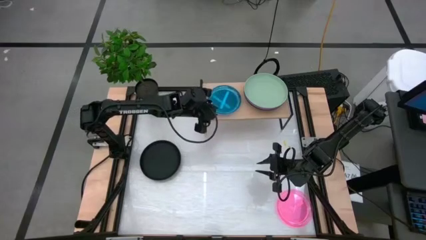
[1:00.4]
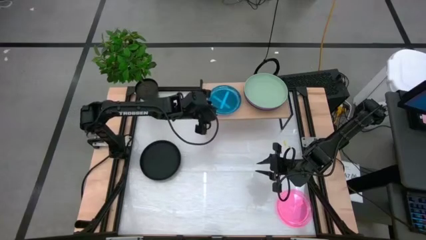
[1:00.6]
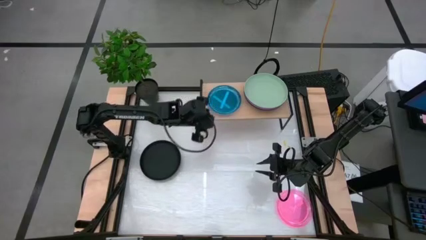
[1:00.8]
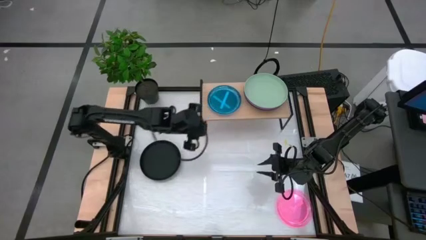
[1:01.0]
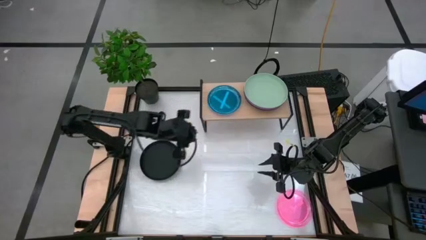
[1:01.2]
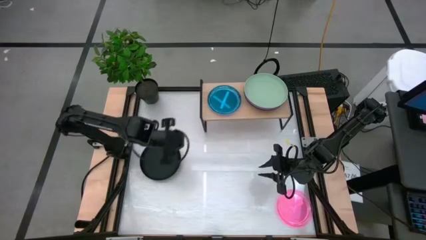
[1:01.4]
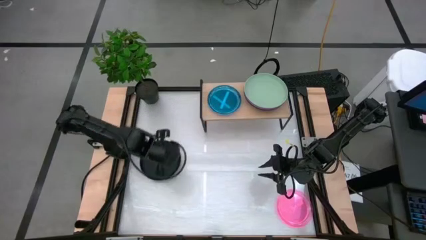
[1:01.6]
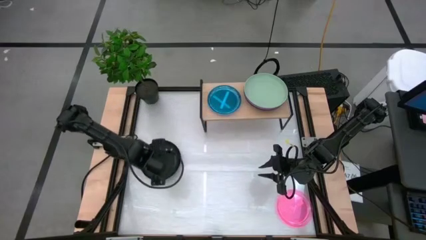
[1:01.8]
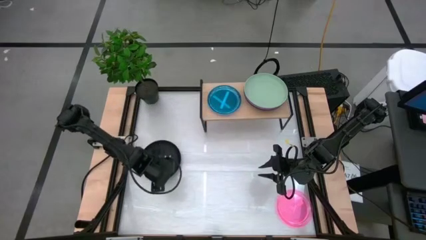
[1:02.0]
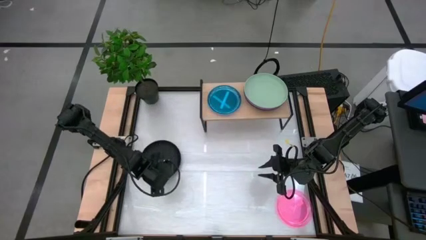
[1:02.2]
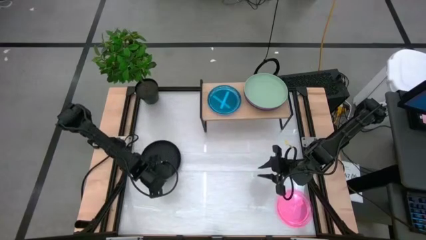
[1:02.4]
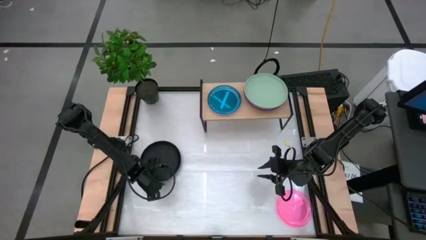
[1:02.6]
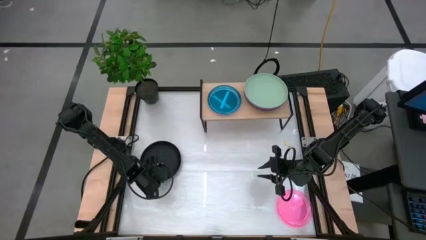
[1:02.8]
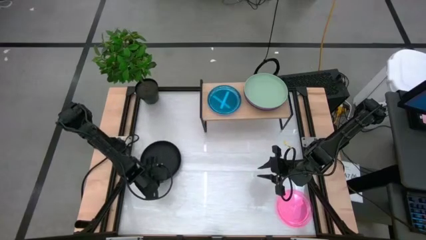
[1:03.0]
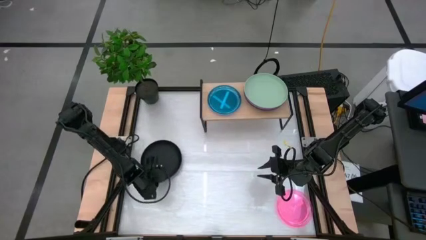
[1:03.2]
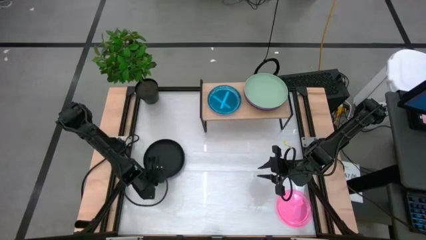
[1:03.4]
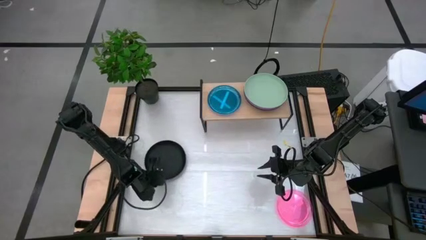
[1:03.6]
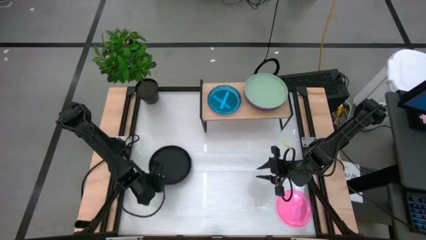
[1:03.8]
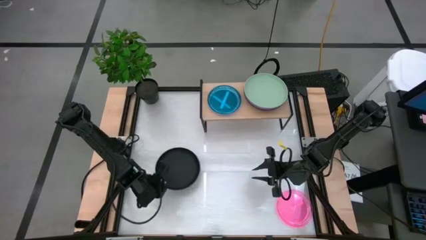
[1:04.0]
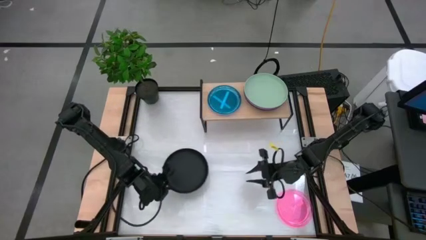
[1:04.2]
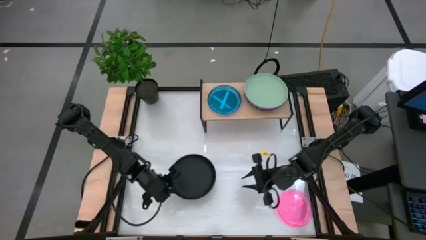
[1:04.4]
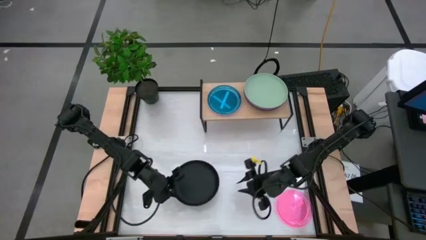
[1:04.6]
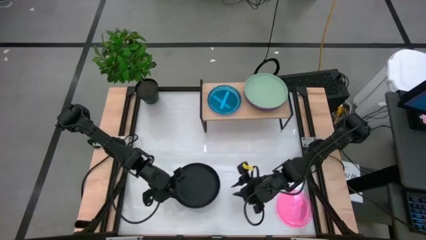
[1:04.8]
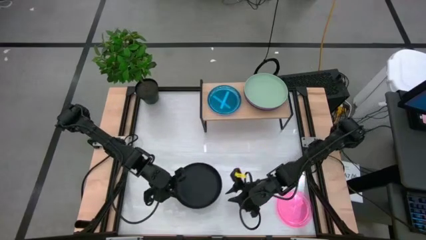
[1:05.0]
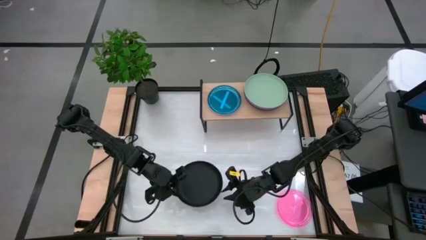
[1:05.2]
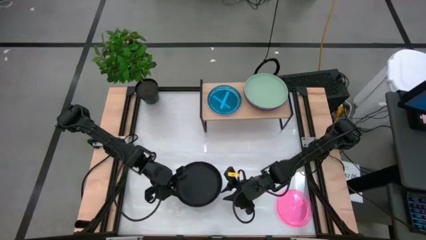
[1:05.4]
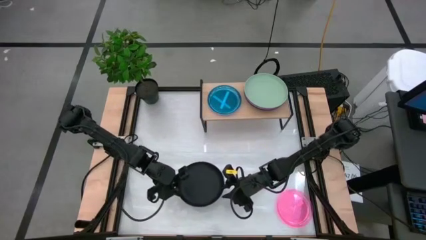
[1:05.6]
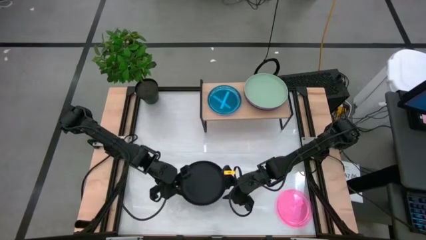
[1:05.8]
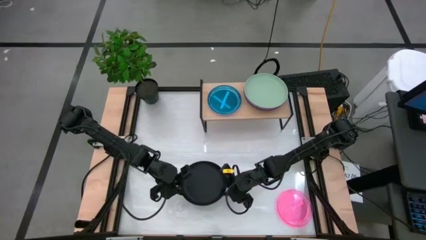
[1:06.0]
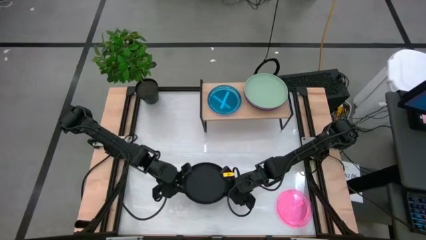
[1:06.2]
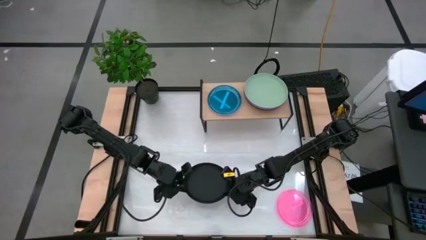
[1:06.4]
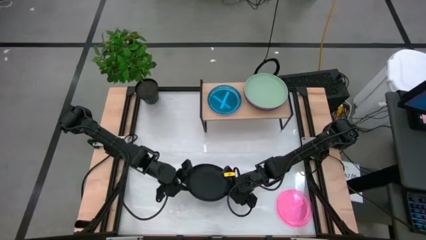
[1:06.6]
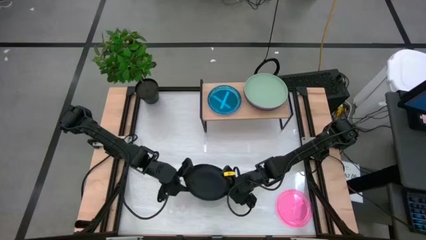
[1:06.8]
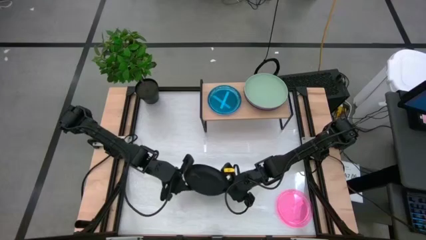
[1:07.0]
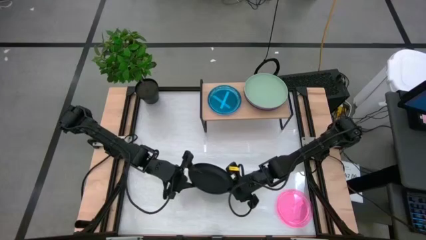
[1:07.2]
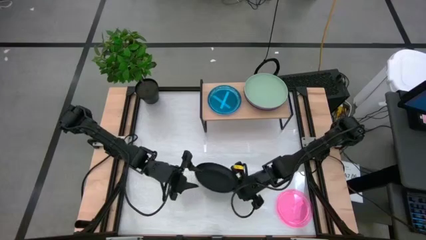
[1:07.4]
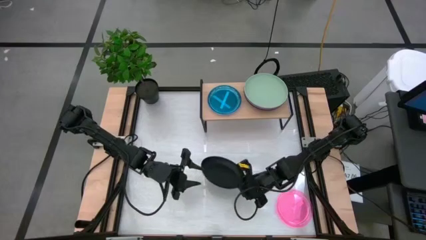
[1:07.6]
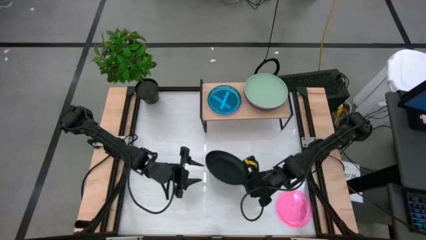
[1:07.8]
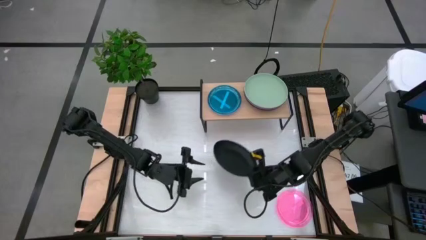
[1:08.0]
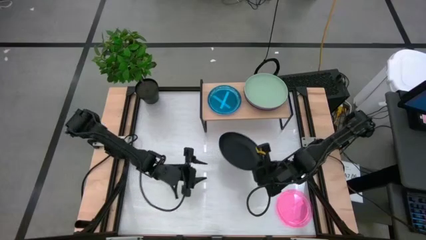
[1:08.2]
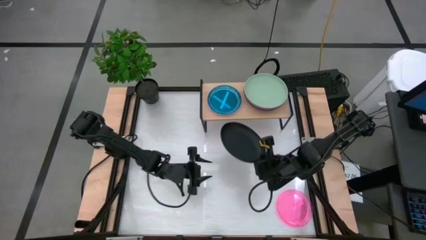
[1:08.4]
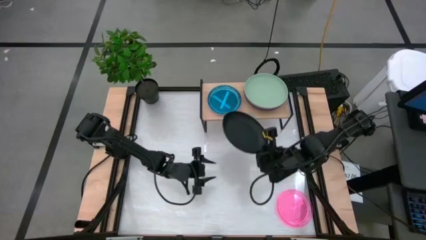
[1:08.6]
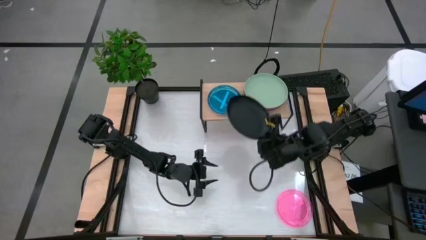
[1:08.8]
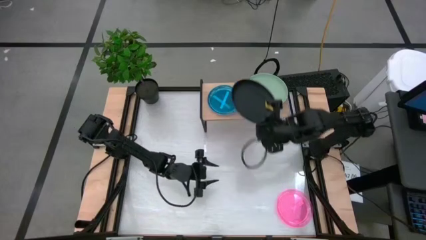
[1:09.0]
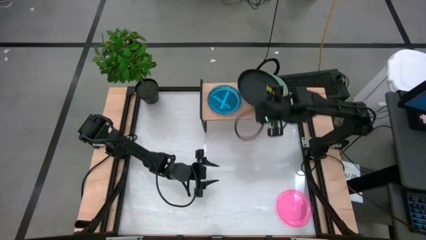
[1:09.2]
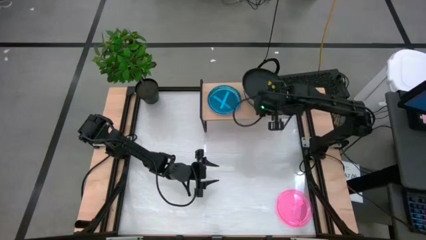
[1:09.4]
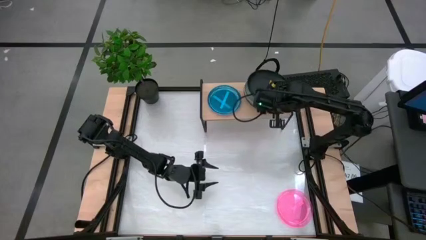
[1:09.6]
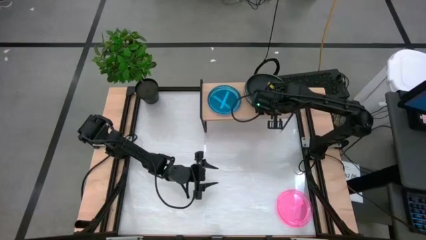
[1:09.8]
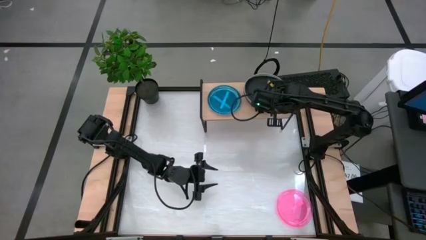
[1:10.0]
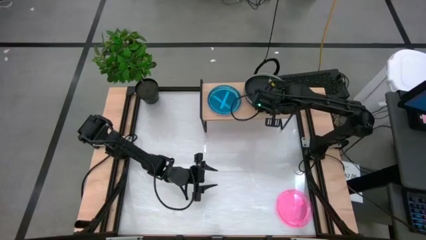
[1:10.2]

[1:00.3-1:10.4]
Task: Place and stack plates onto a shelf
Stack the black plate on top of the light green plate on the shelf

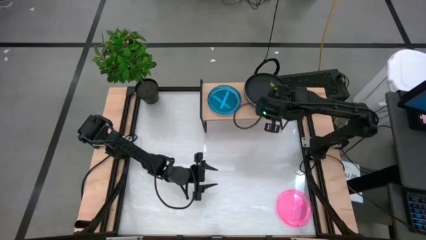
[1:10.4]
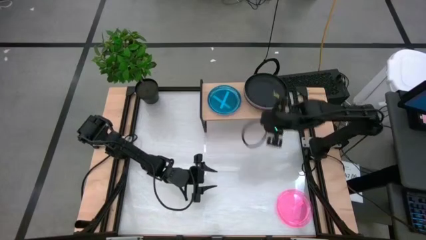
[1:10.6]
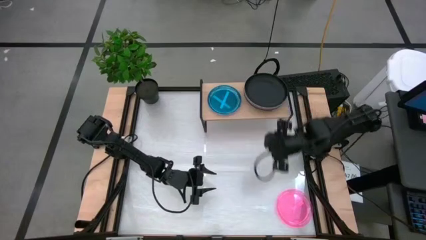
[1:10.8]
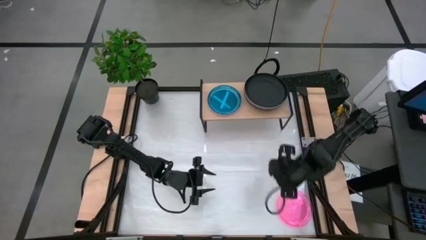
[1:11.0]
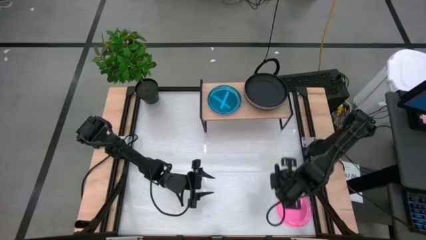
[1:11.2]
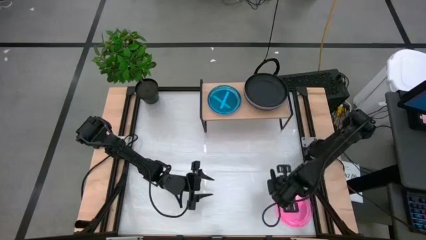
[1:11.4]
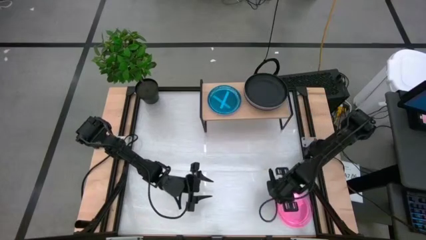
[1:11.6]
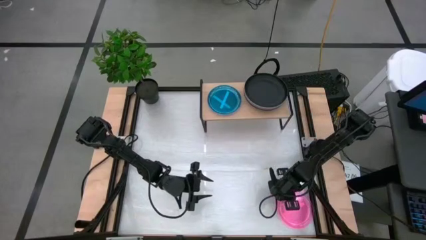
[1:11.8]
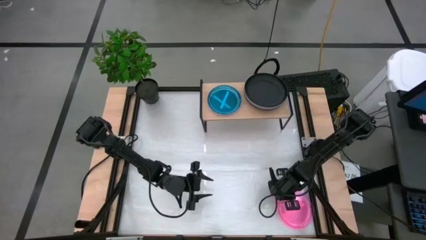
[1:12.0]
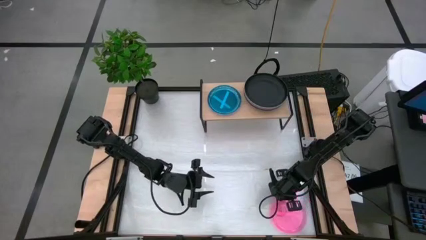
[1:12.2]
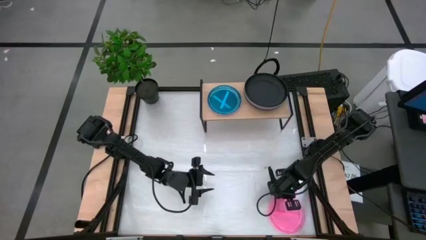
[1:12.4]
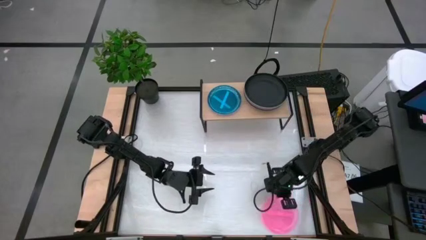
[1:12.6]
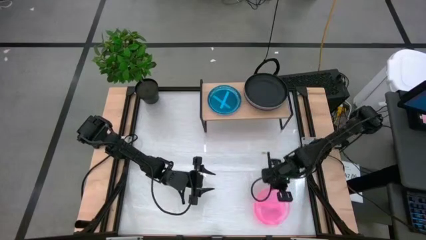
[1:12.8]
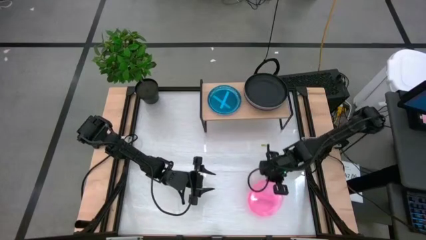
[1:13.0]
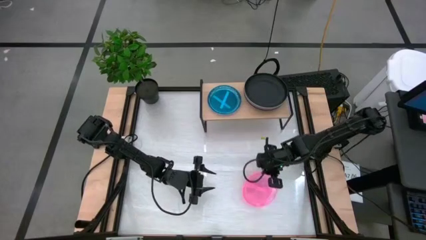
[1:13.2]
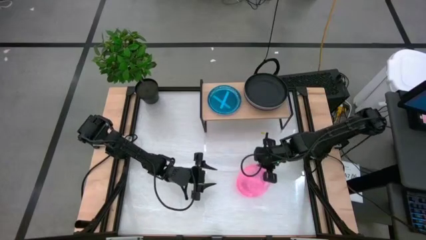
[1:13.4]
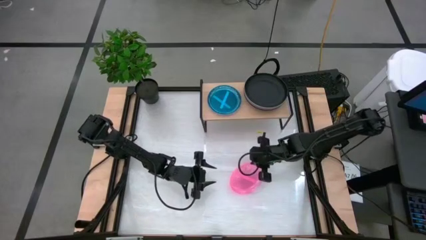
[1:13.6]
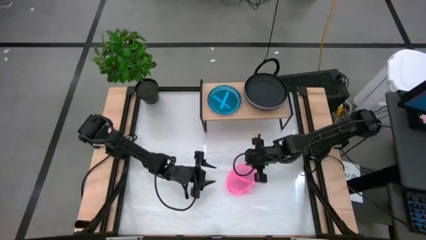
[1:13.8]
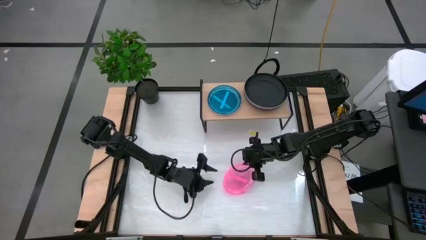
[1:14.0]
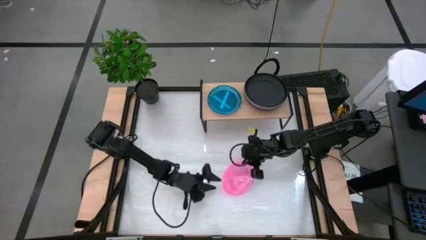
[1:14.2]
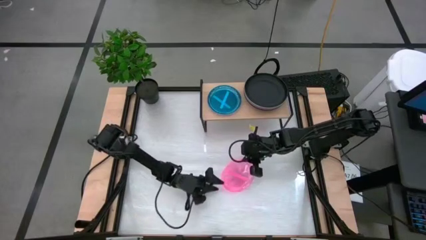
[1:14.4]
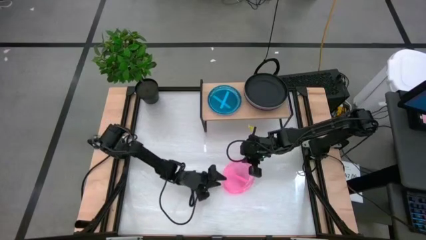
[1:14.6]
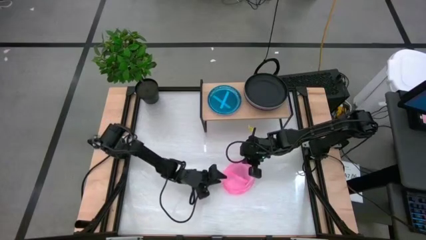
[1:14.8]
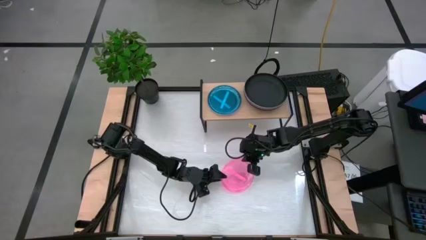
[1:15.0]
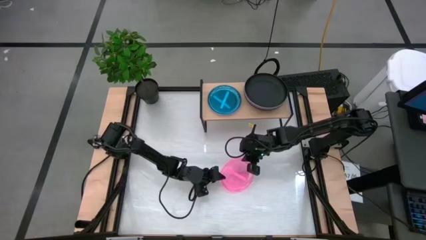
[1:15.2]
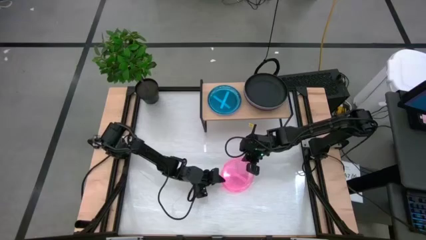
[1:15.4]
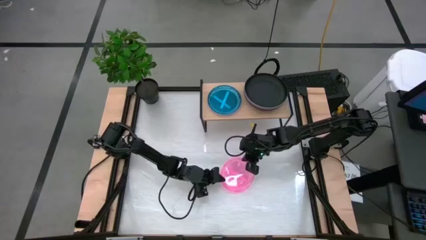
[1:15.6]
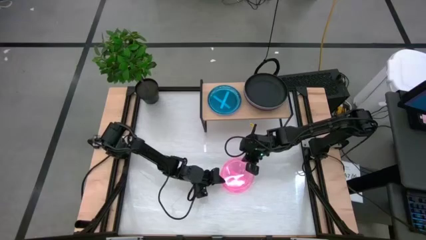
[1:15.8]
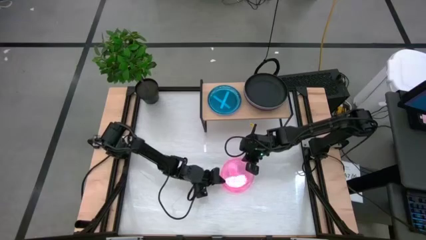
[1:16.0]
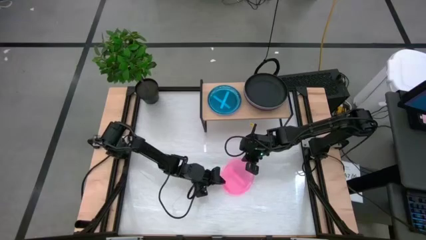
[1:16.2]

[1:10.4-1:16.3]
Stack the pink plate on top of the blue plate on the shelf
